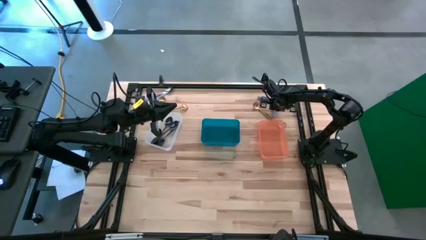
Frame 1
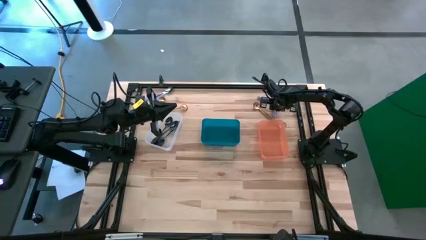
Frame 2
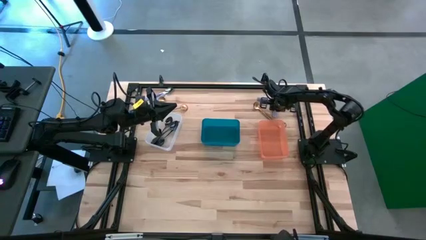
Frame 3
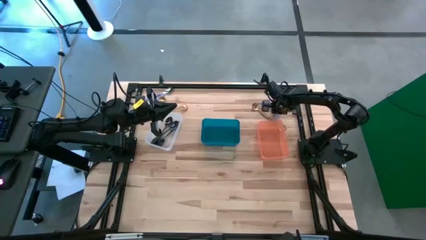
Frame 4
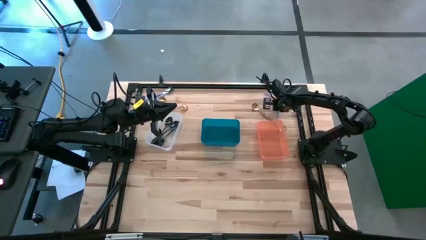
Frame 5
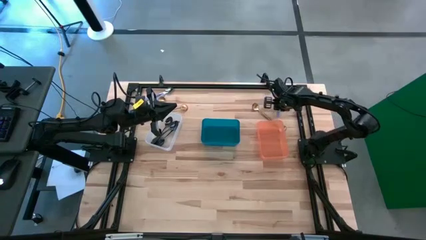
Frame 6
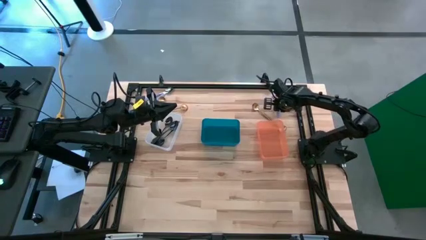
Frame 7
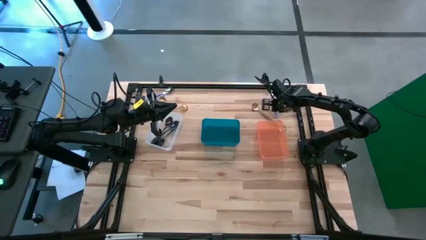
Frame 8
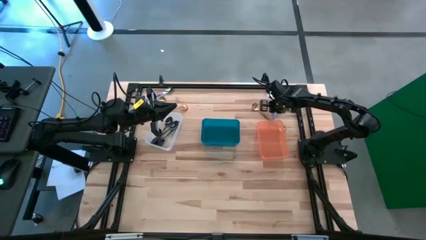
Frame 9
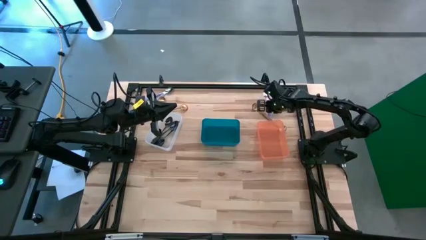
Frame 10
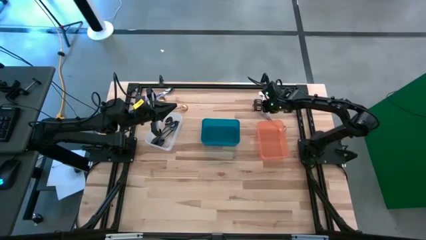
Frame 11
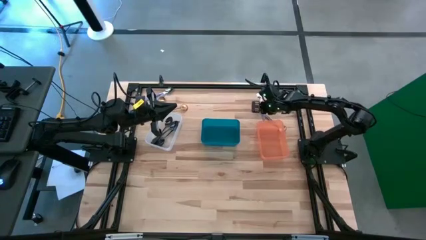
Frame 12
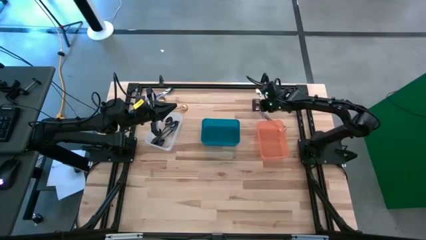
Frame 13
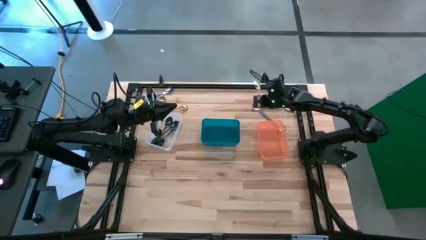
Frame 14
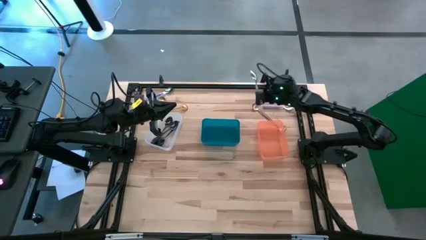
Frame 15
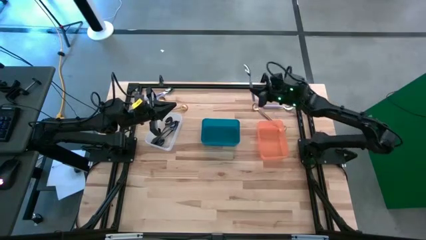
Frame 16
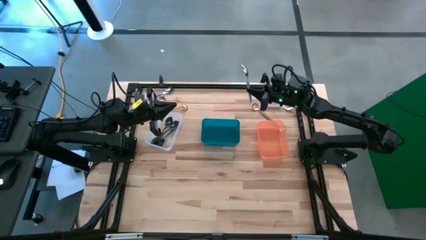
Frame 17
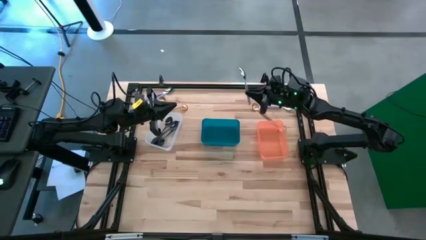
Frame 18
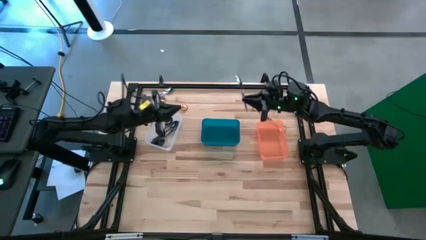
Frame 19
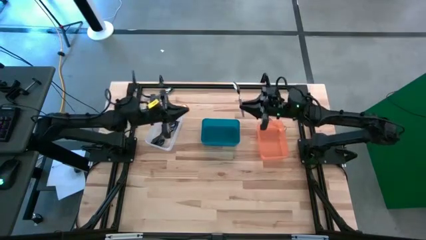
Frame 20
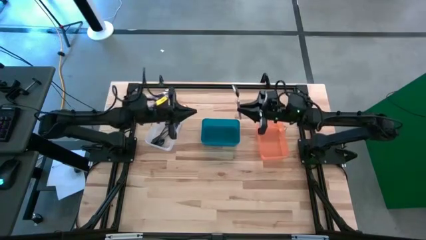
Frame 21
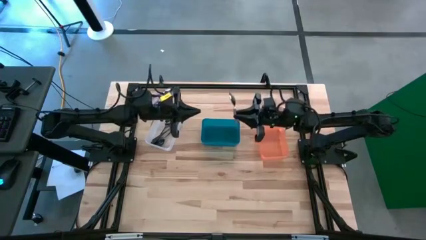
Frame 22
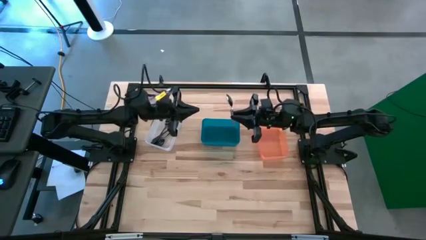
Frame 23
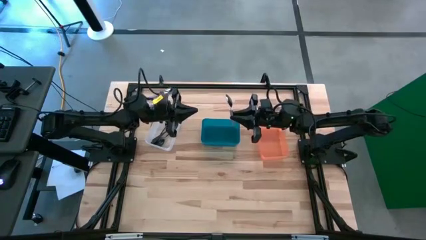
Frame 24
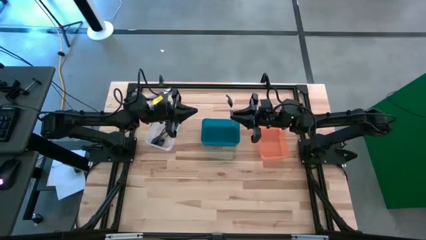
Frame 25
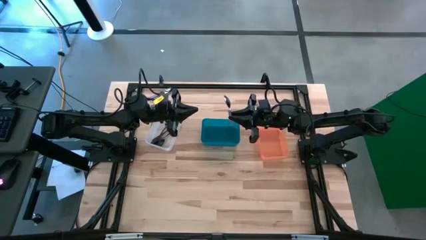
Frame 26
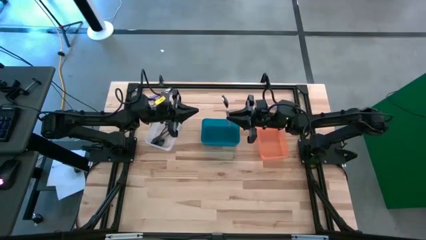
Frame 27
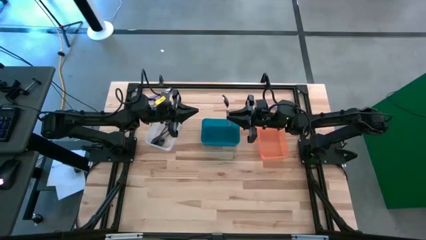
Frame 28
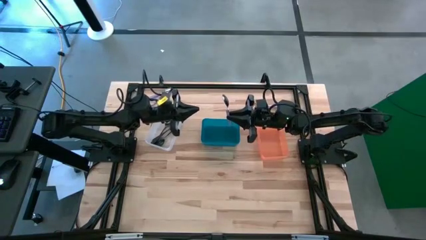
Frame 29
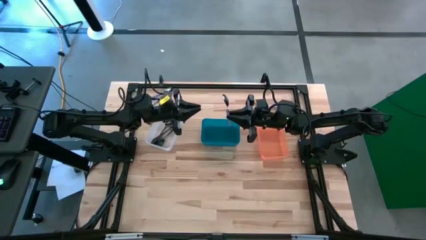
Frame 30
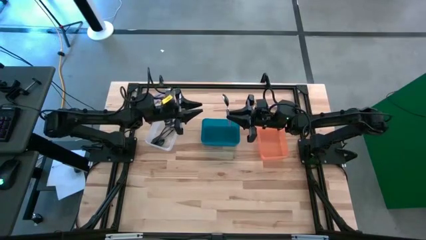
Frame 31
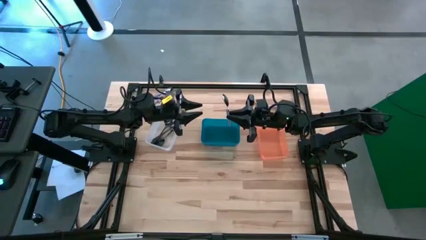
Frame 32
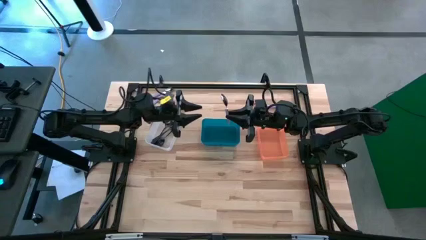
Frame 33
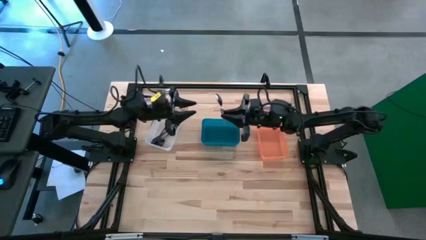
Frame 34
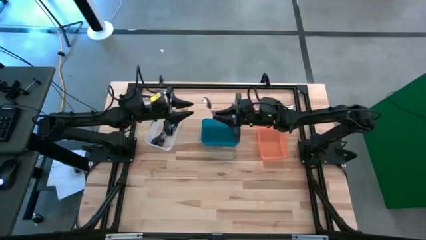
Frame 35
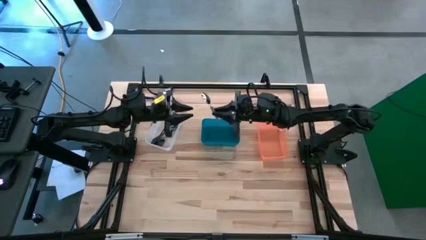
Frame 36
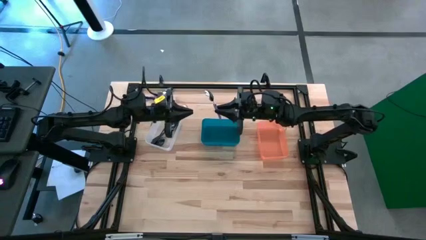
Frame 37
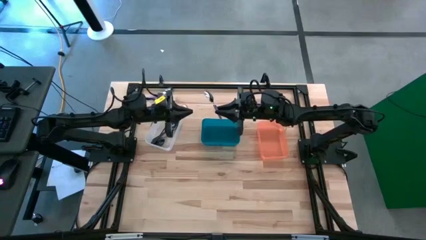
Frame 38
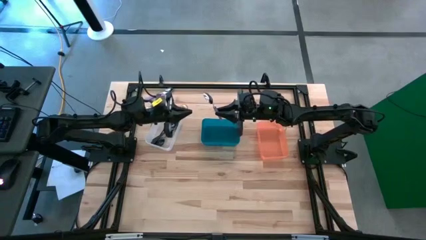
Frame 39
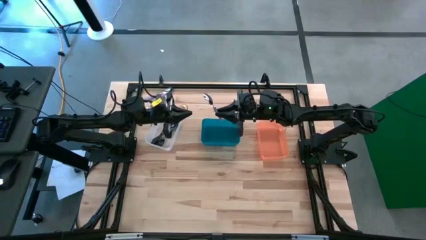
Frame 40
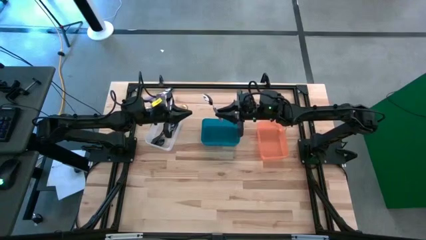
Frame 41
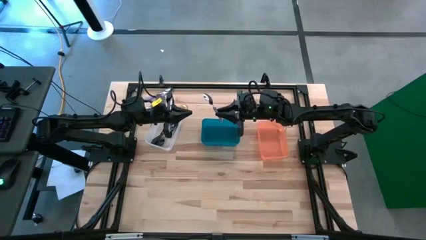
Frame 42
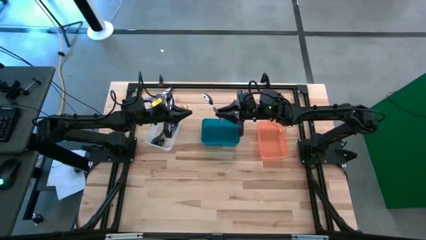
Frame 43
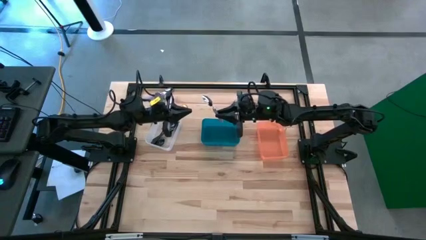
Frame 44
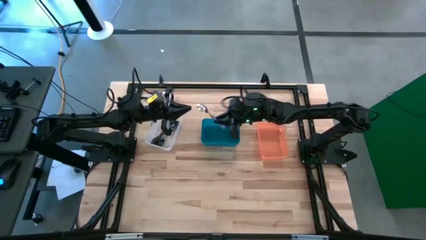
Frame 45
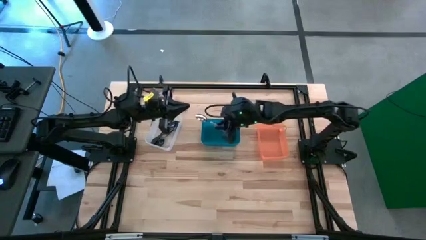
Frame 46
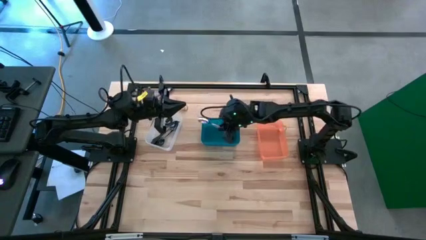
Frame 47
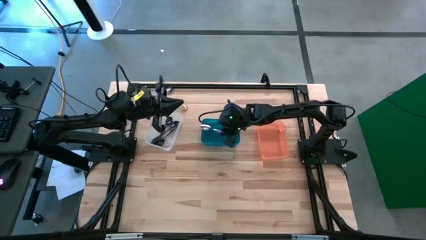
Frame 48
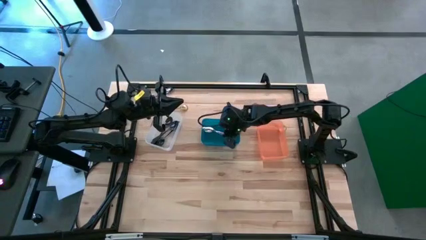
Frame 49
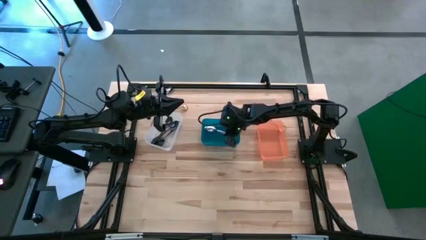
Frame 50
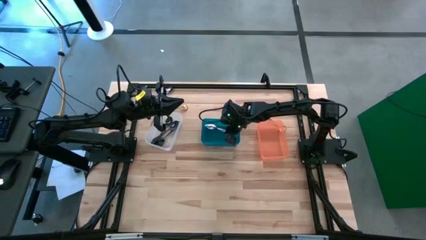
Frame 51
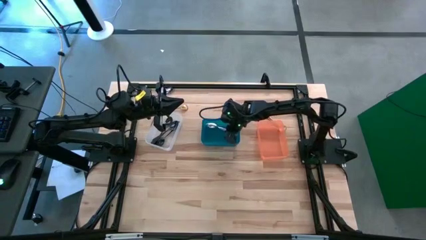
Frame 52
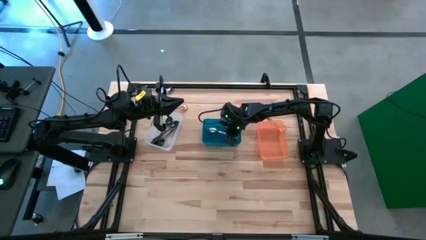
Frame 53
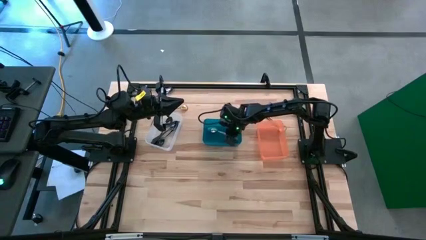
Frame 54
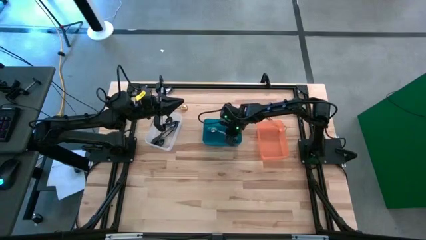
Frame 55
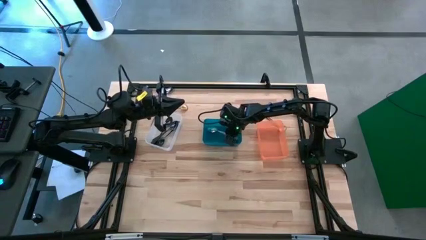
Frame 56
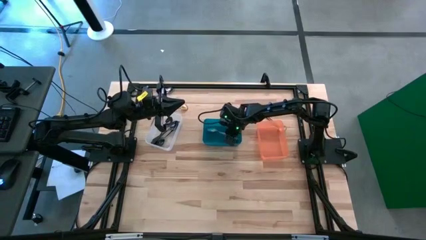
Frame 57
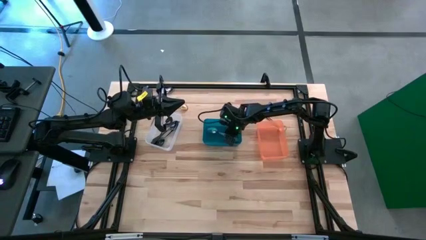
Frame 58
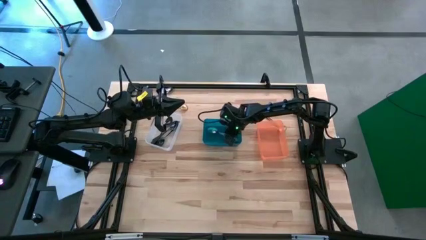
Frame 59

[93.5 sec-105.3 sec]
Task: Sort silverware by color (type)
Put the purple spoon into the blue bin
